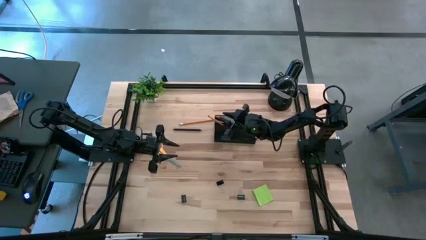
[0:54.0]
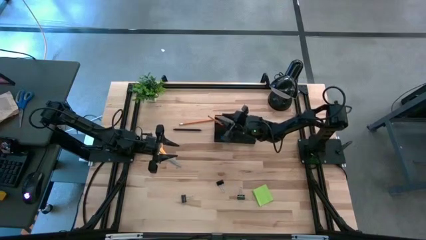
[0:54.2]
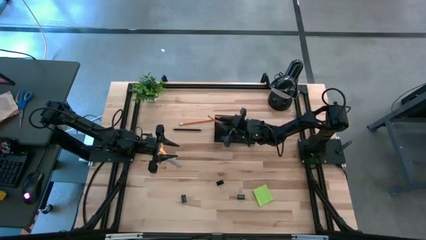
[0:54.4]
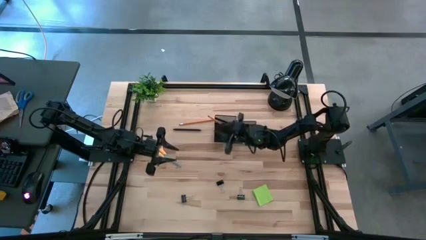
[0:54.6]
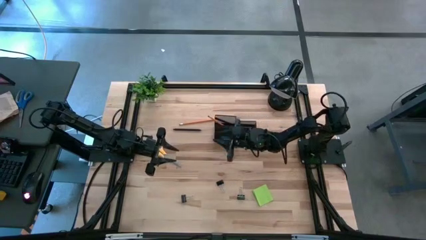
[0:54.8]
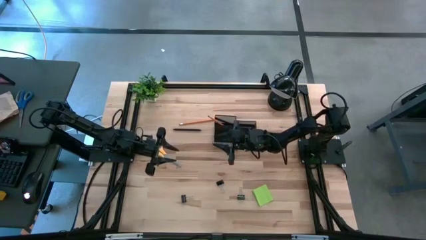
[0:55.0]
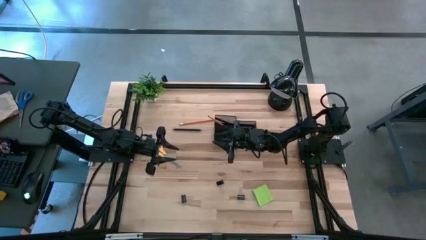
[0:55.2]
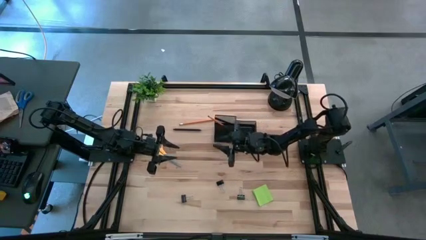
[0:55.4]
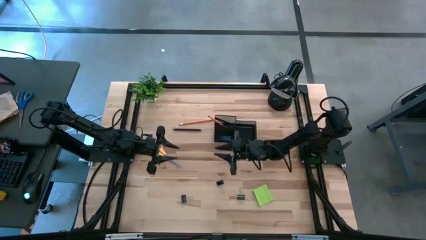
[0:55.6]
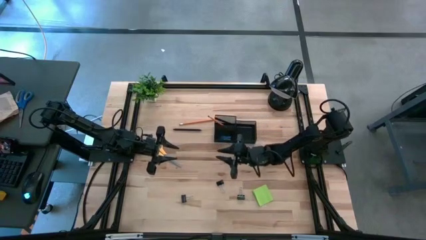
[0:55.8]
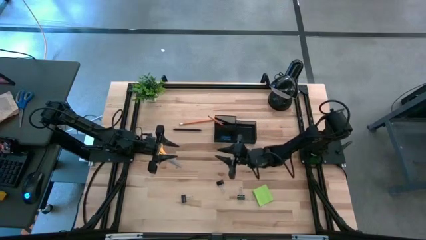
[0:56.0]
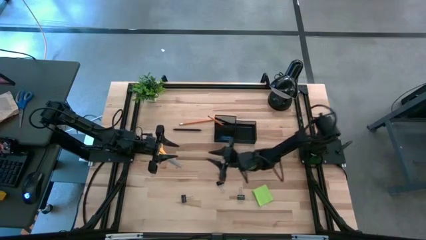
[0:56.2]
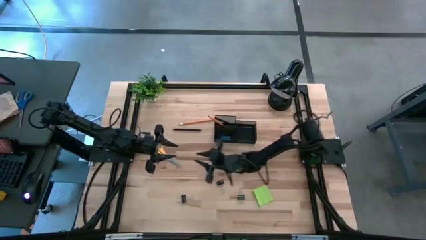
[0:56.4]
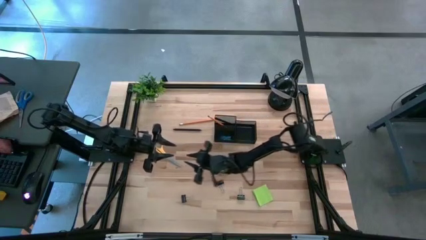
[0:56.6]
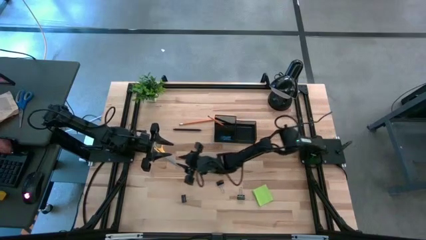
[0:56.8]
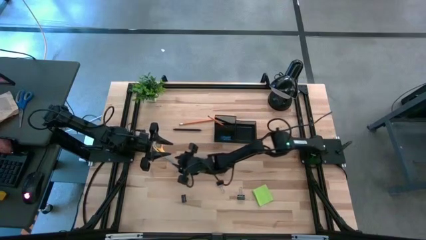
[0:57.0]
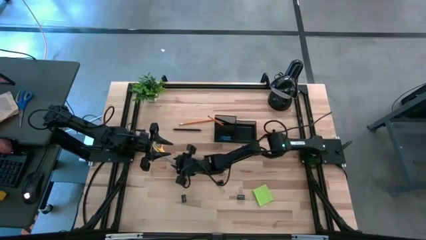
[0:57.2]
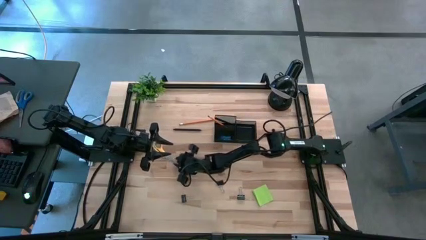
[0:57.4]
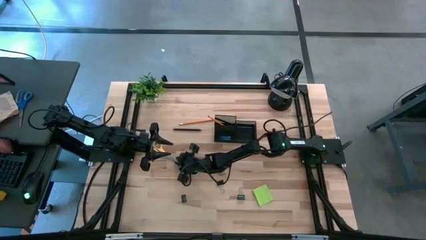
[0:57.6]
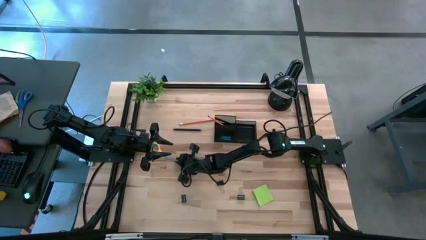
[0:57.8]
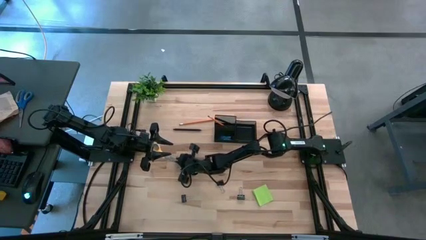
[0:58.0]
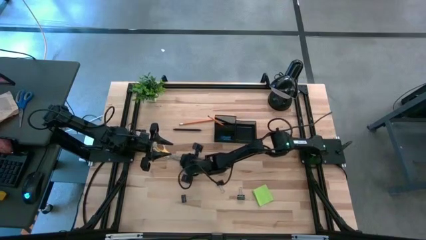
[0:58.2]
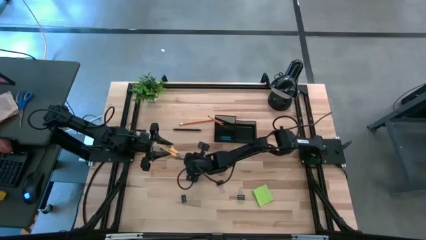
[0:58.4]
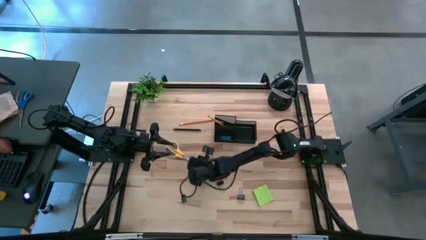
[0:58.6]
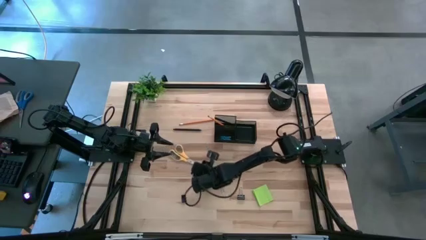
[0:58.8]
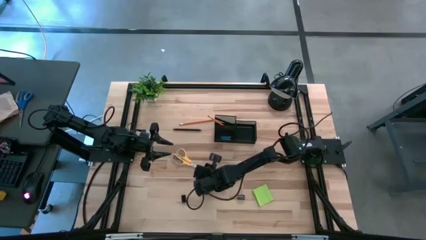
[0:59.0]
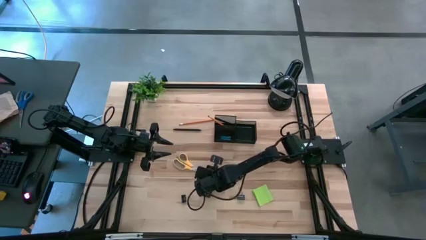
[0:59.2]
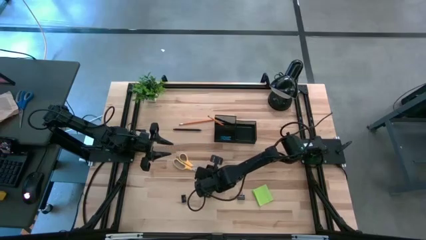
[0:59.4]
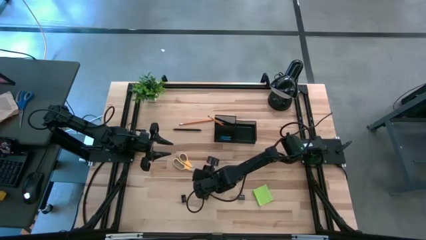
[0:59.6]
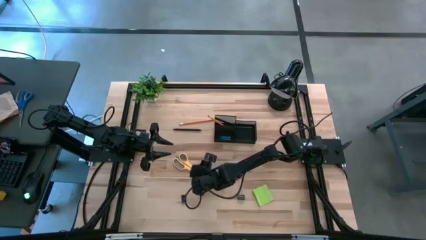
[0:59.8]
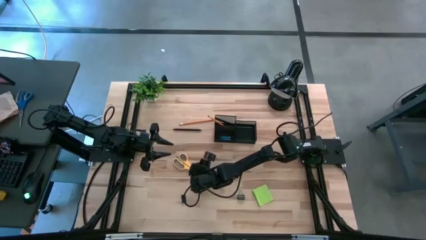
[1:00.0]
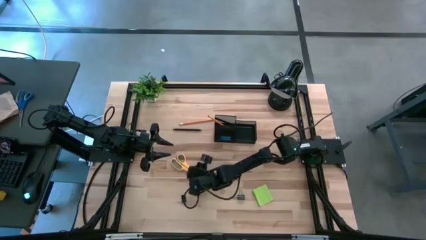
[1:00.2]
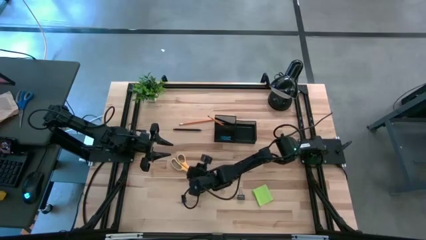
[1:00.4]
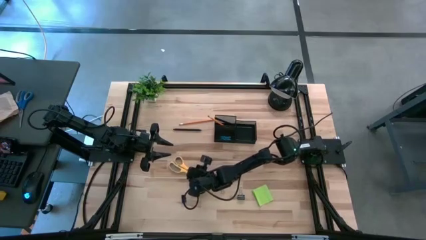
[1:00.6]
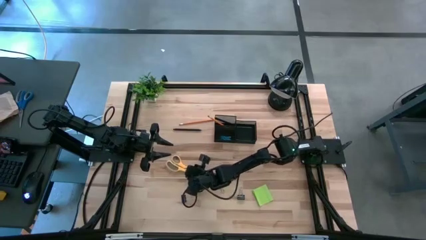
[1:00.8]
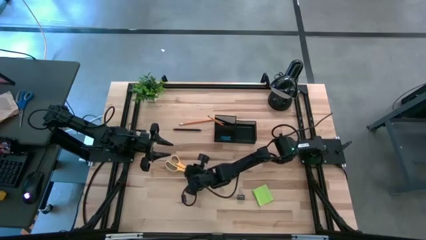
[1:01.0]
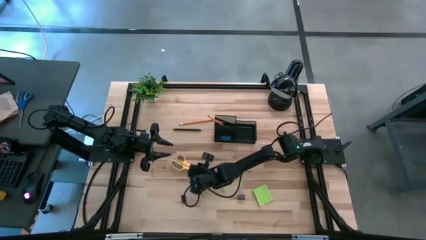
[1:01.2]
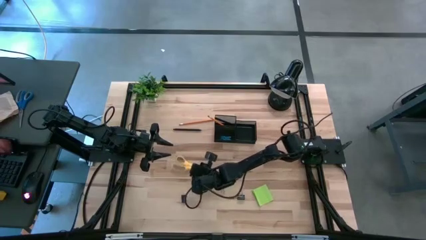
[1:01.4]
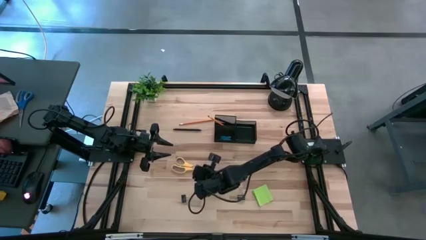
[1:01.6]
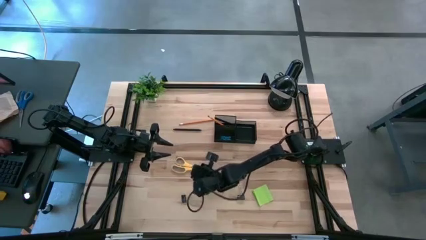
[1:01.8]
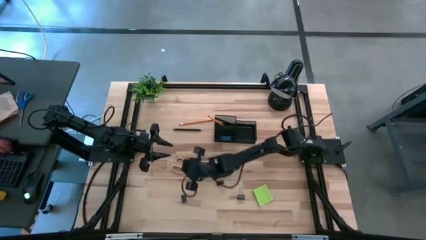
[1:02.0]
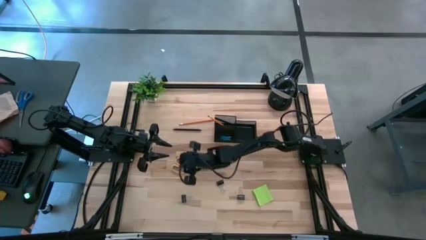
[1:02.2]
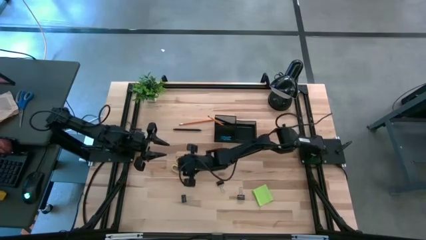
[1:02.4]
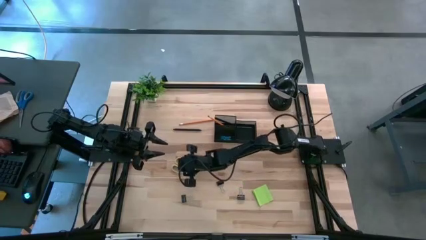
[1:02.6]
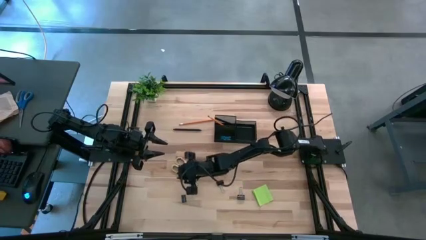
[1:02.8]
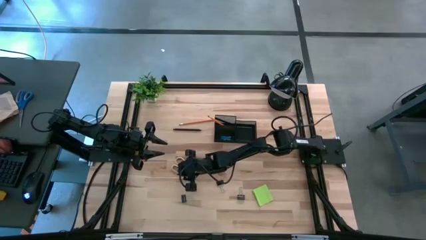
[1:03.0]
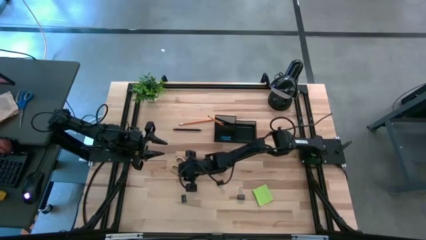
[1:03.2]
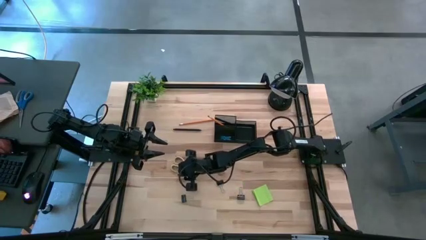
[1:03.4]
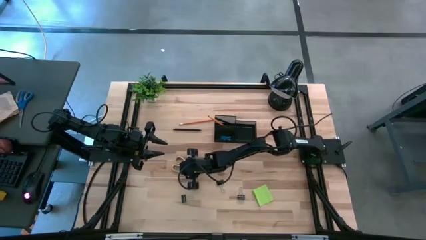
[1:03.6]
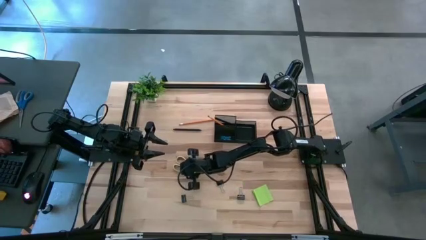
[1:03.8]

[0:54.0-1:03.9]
Task: Pick and place office supplies into organizer
Put the yellow scissors into the desk organizer

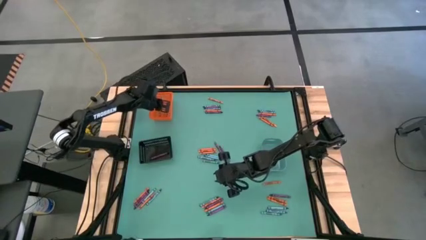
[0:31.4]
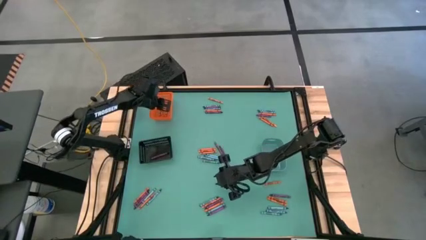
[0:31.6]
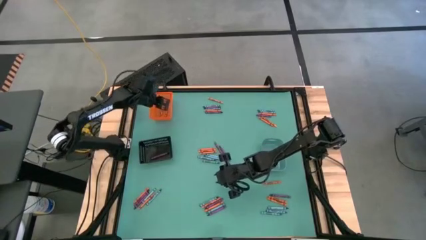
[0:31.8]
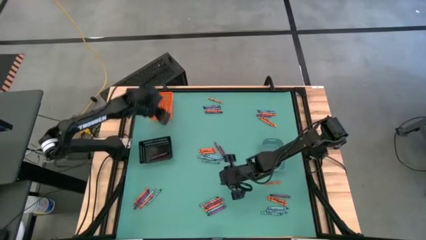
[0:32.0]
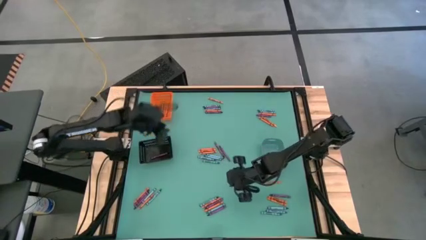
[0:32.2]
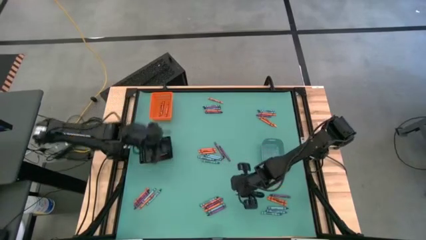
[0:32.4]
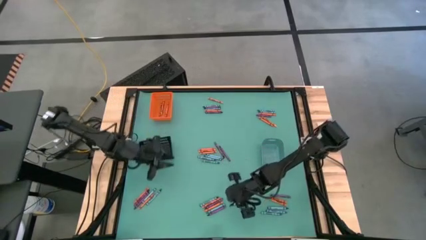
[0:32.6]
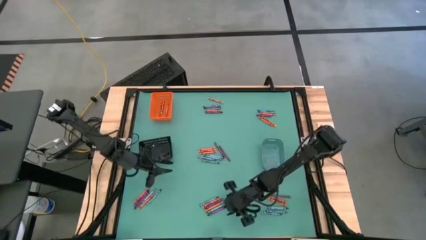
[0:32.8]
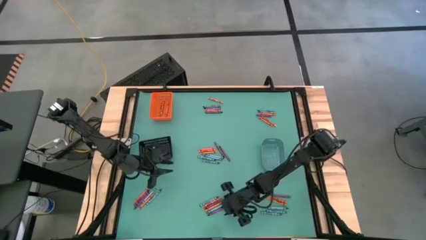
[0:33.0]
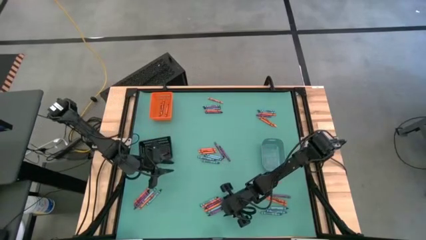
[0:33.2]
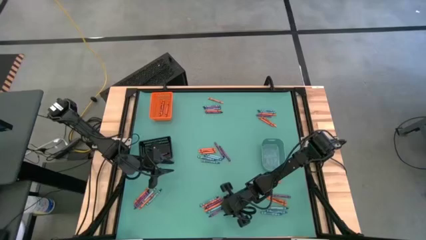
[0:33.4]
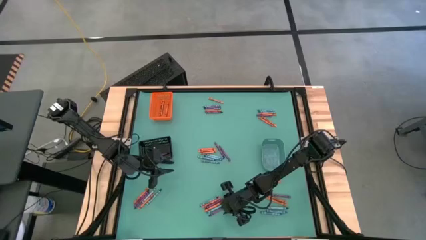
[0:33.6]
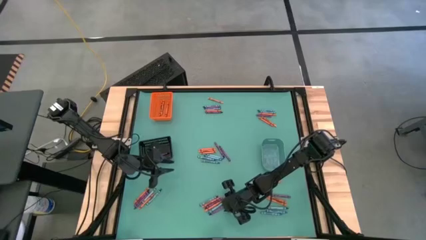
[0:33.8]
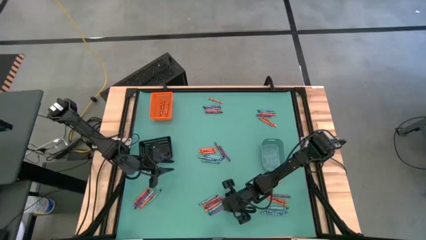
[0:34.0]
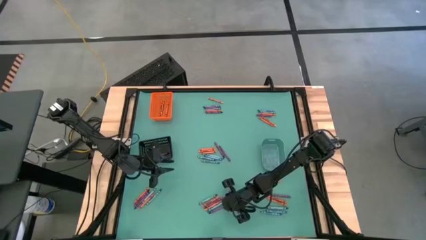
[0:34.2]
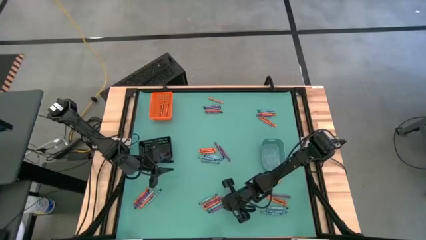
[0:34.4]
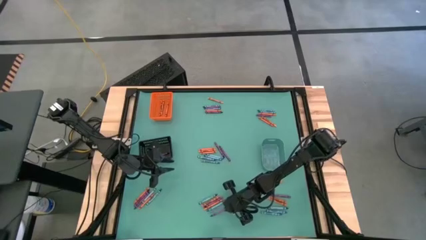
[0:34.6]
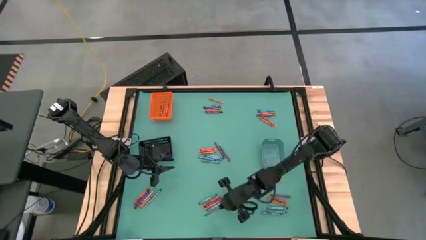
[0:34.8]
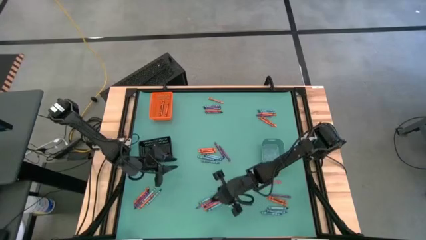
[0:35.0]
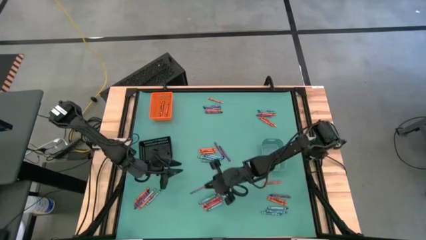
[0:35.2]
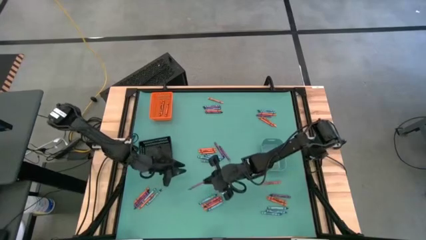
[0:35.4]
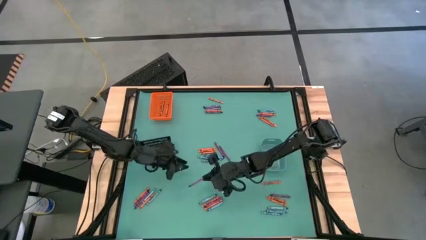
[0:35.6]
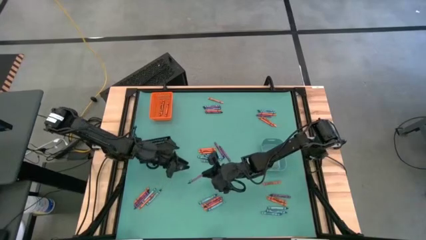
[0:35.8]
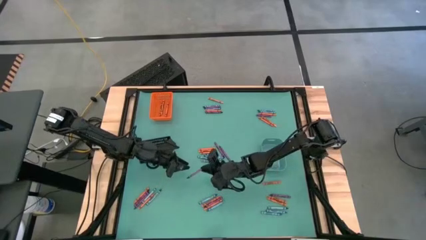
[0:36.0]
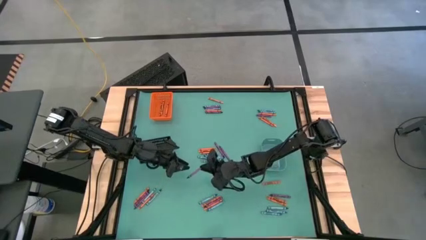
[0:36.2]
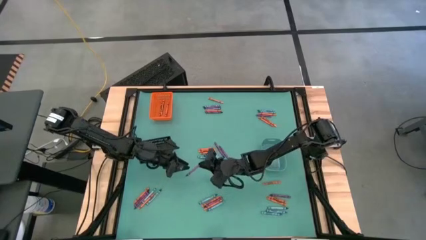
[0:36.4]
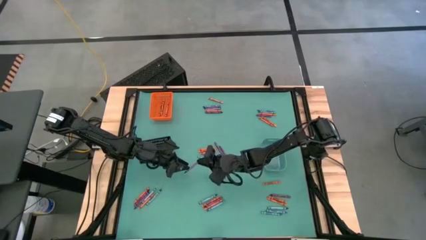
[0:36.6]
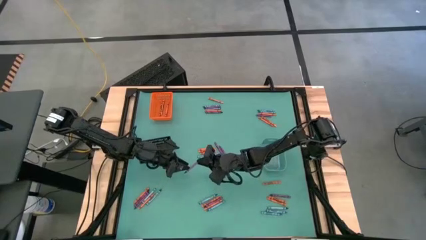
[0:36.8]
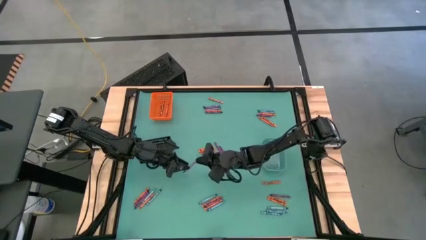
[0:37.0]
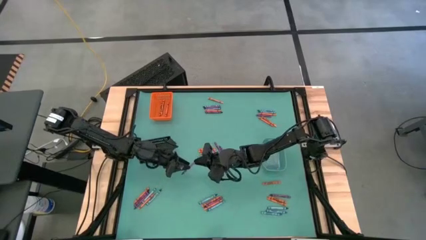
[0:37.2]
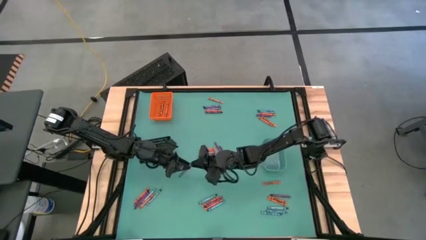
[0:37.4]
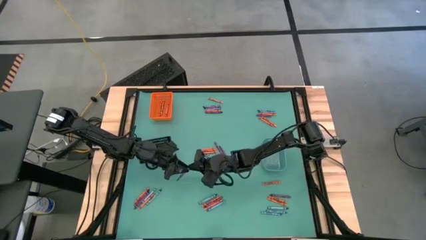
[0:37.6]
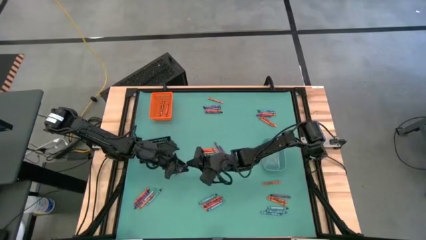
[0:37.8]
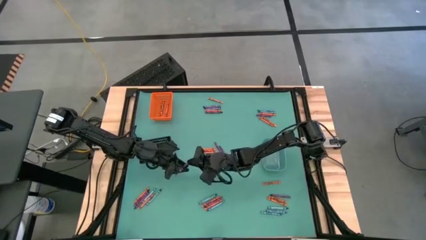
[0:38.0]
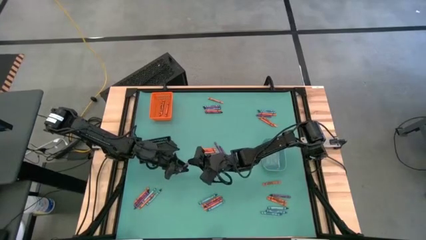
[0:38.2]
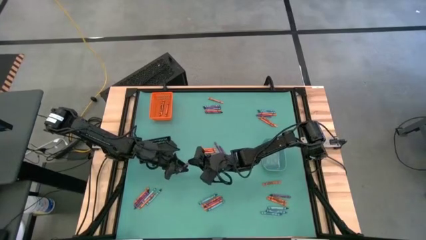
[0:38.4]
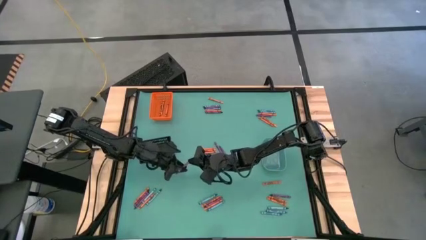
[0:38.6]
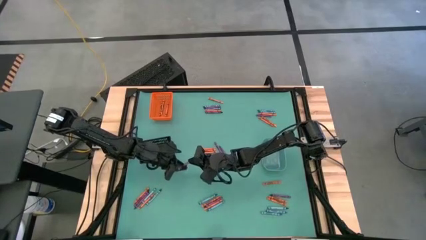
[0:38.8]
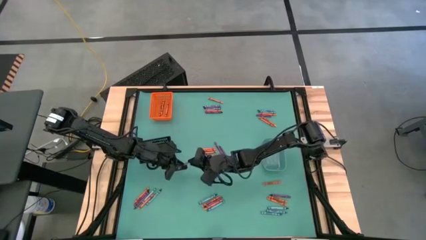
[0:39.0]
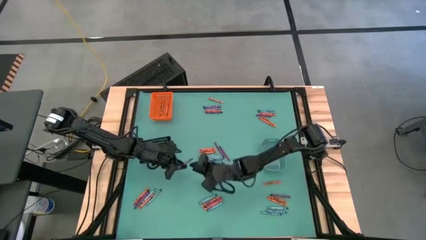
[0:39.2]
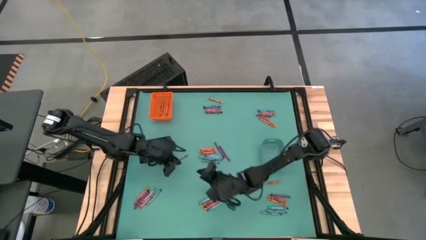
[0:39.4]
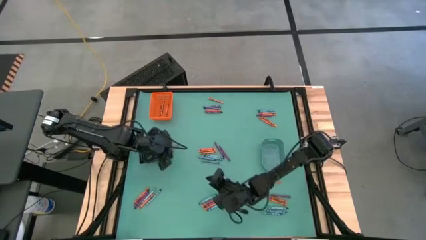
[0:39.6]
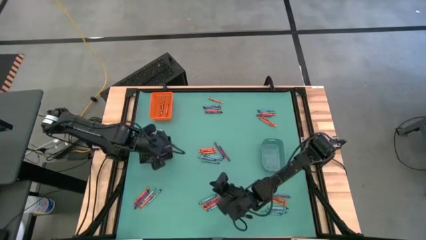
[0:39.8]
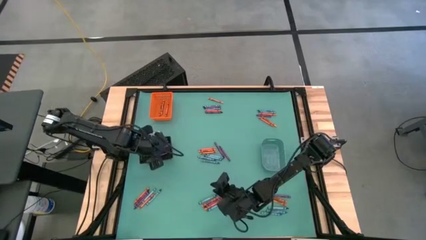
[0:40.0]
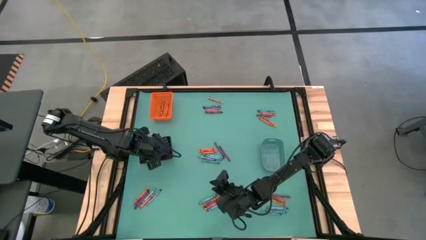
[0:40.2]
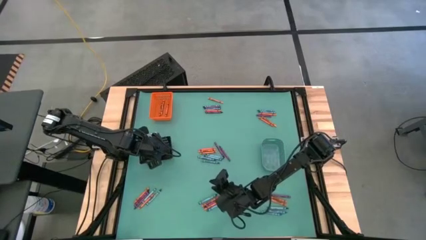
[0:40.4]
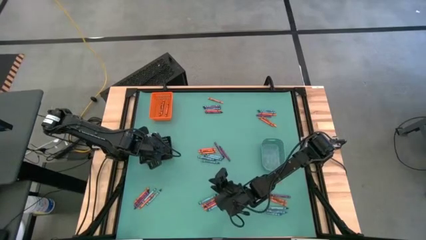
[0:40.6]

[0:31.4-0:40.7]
Task: Sort crayons
Put the violet crayon into the black bin
